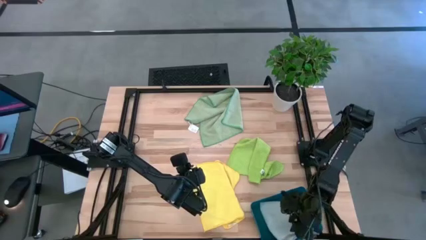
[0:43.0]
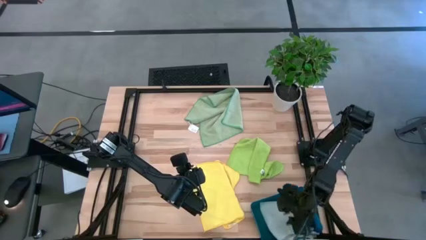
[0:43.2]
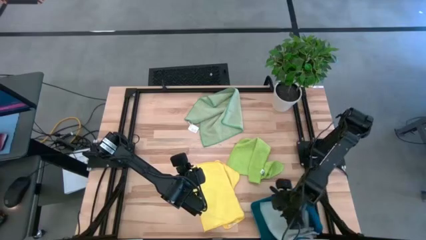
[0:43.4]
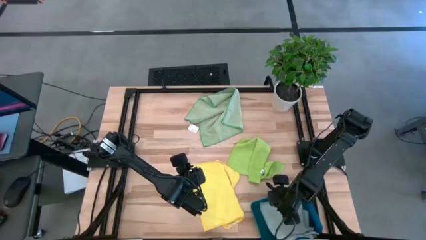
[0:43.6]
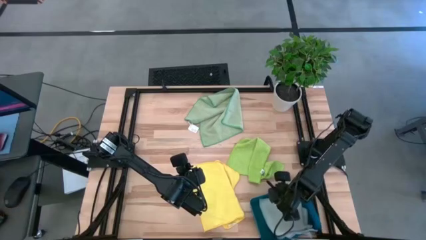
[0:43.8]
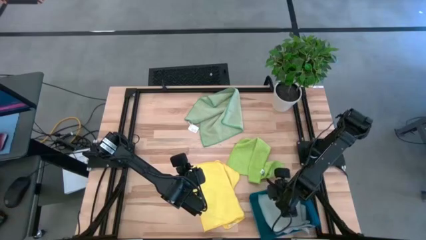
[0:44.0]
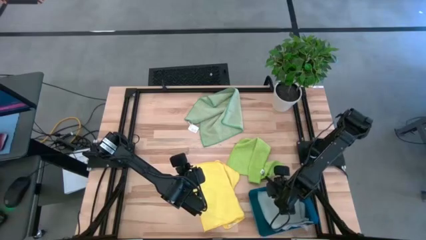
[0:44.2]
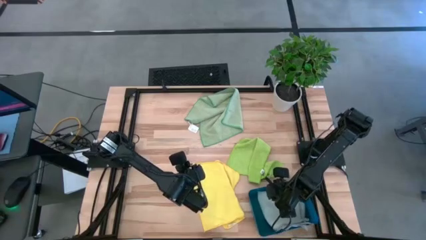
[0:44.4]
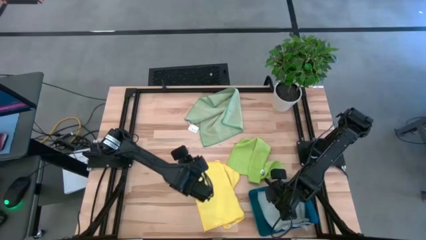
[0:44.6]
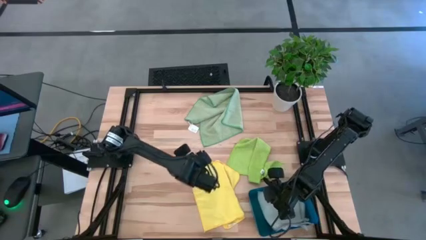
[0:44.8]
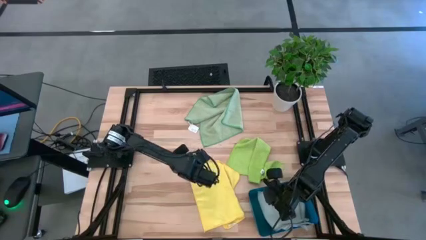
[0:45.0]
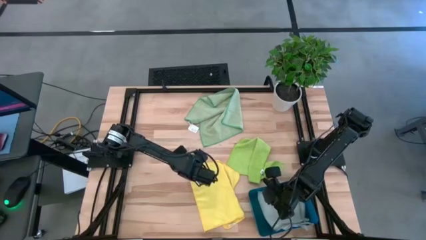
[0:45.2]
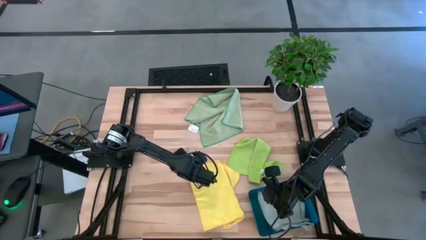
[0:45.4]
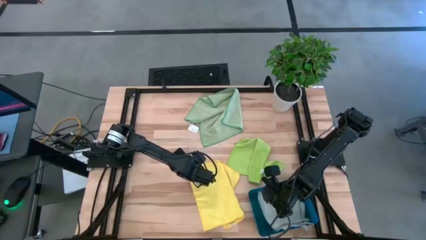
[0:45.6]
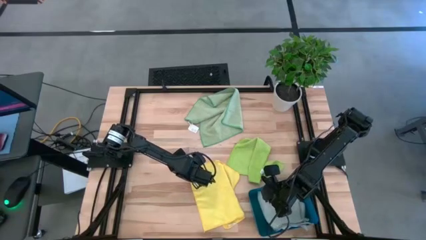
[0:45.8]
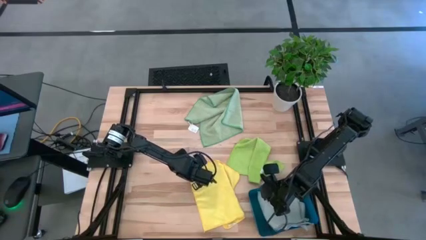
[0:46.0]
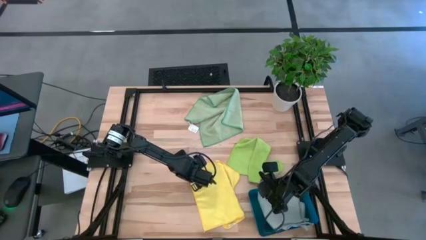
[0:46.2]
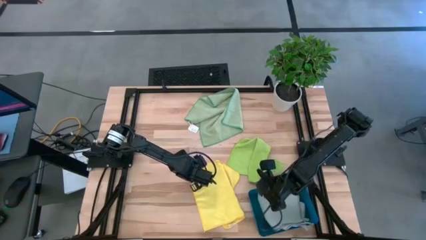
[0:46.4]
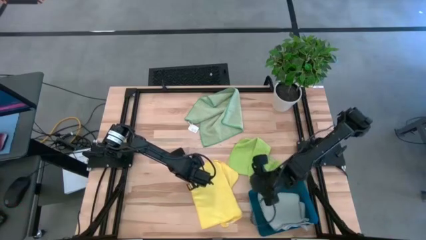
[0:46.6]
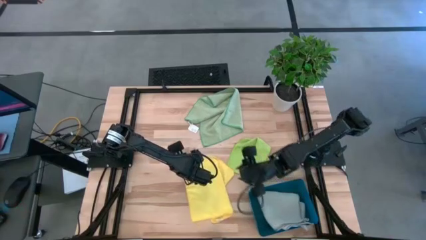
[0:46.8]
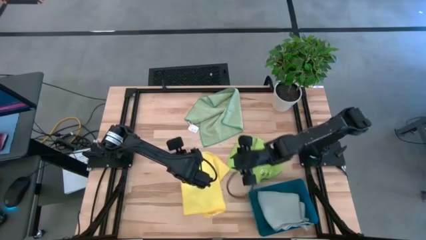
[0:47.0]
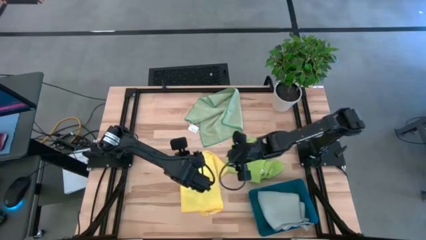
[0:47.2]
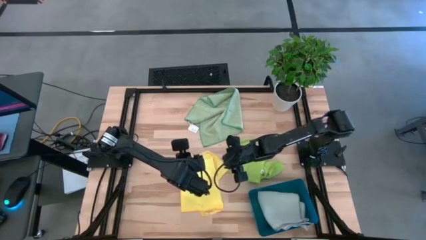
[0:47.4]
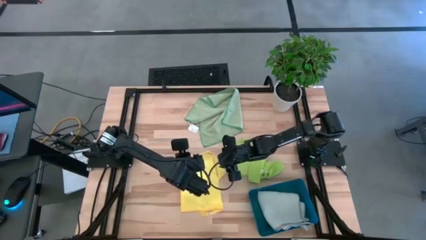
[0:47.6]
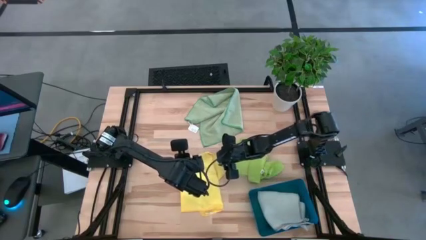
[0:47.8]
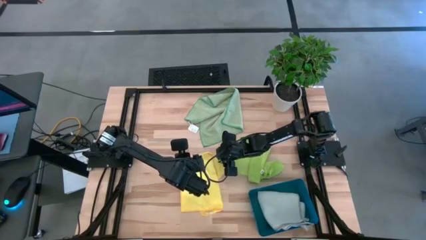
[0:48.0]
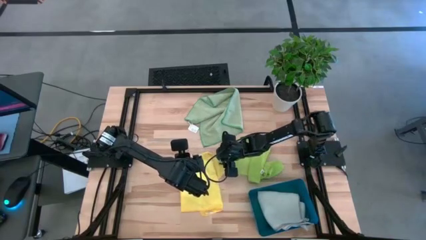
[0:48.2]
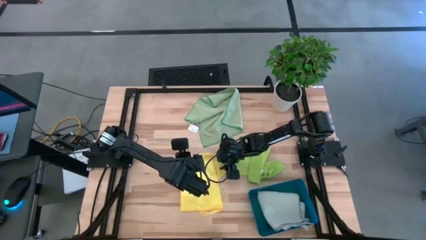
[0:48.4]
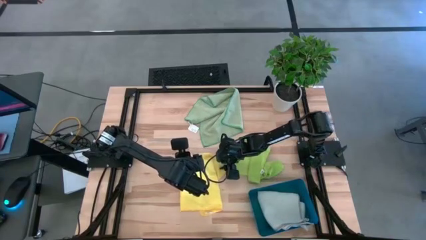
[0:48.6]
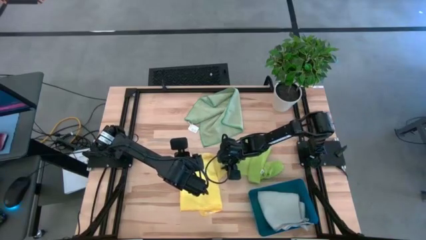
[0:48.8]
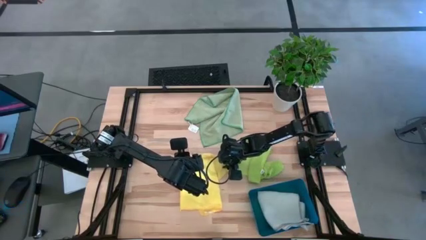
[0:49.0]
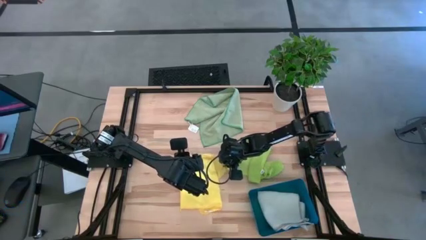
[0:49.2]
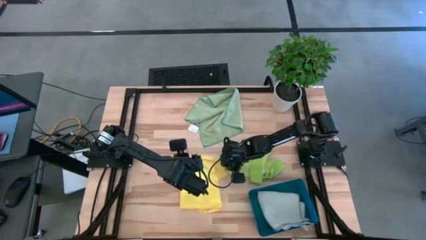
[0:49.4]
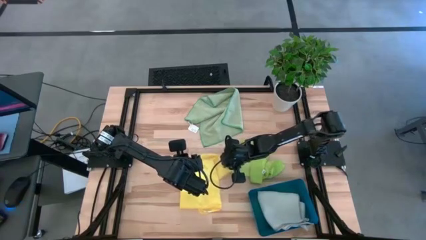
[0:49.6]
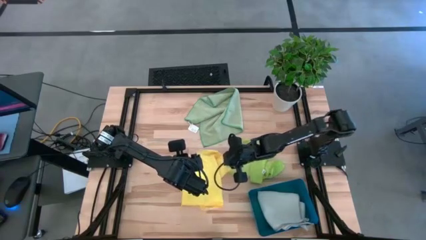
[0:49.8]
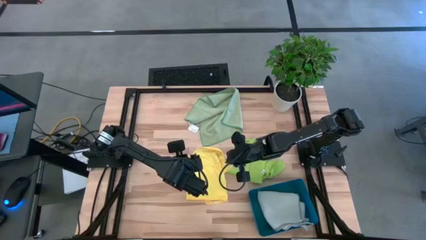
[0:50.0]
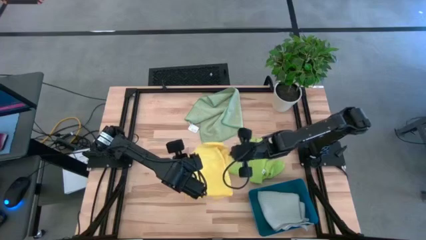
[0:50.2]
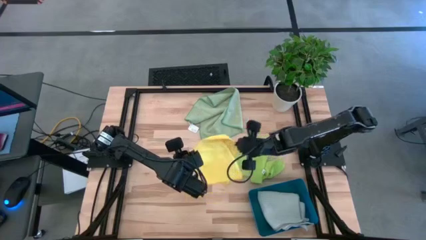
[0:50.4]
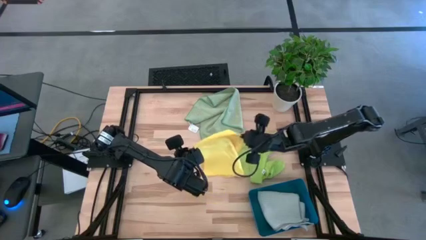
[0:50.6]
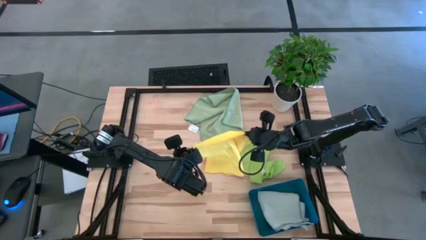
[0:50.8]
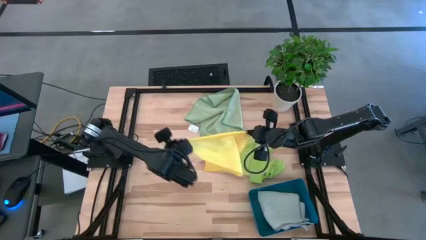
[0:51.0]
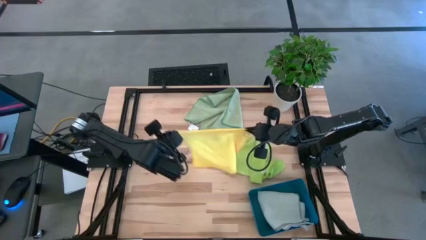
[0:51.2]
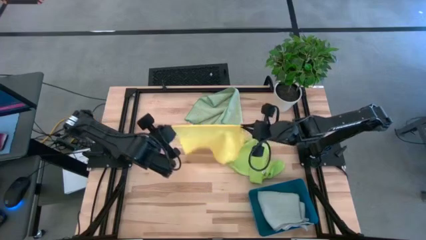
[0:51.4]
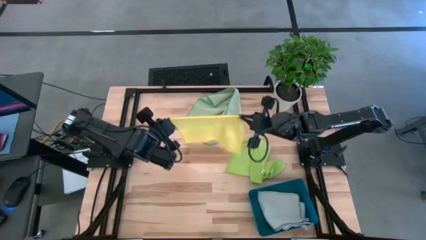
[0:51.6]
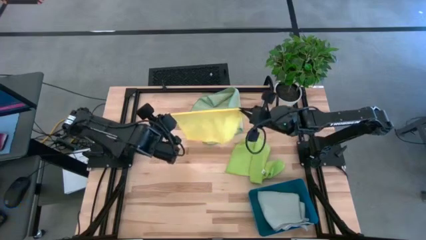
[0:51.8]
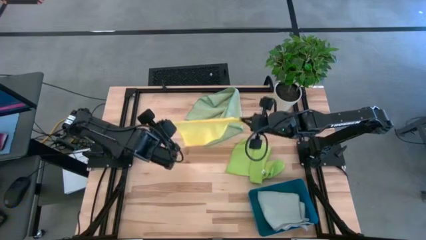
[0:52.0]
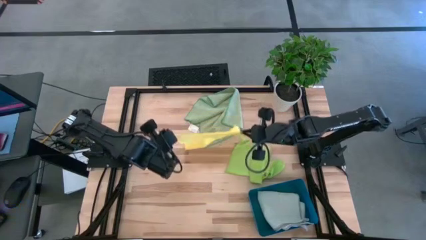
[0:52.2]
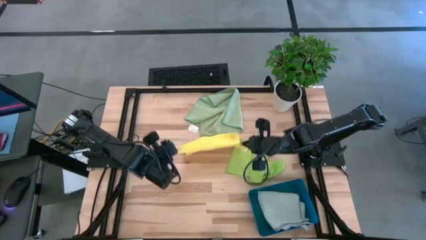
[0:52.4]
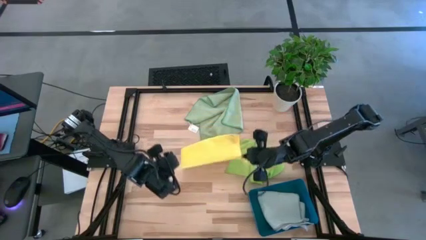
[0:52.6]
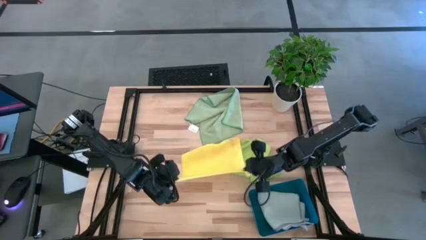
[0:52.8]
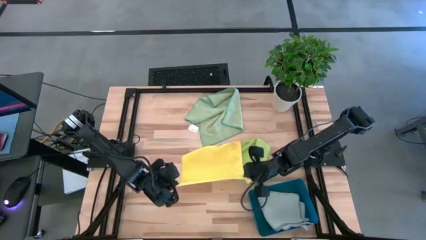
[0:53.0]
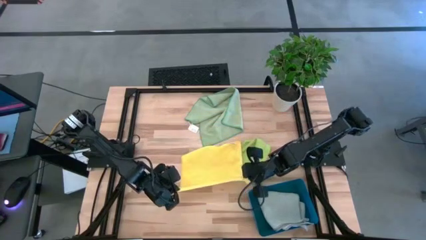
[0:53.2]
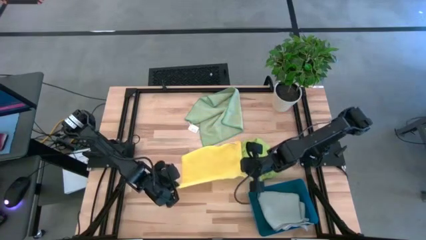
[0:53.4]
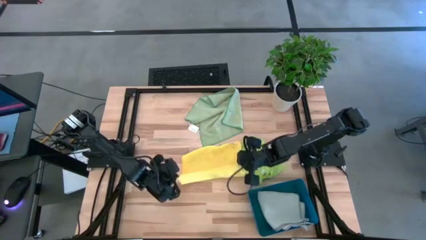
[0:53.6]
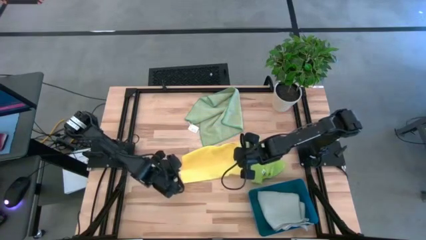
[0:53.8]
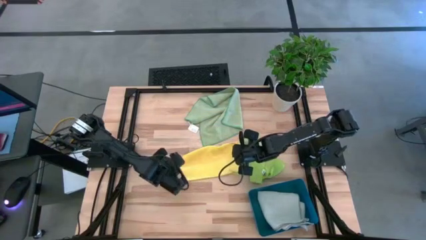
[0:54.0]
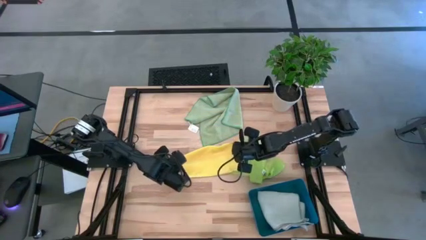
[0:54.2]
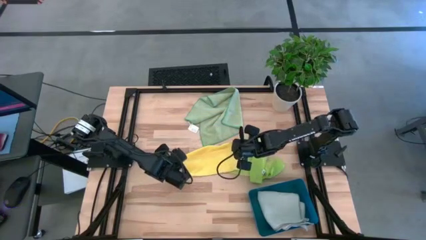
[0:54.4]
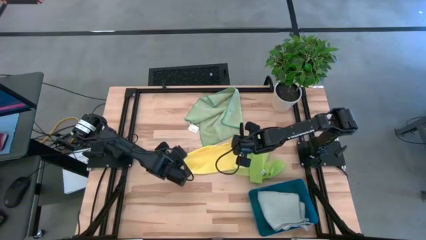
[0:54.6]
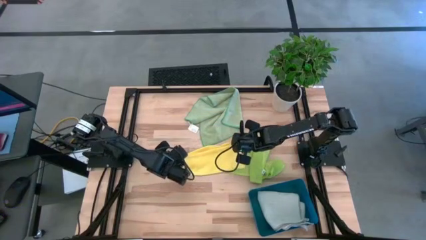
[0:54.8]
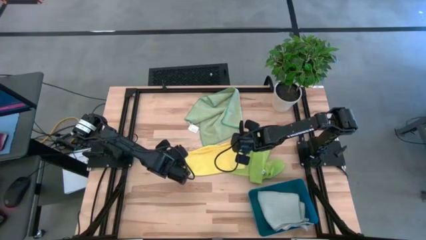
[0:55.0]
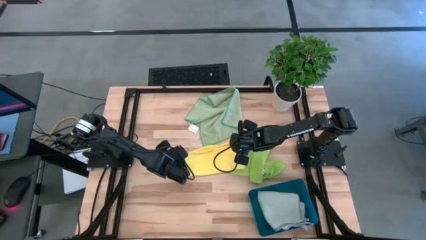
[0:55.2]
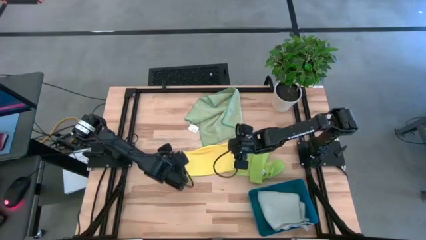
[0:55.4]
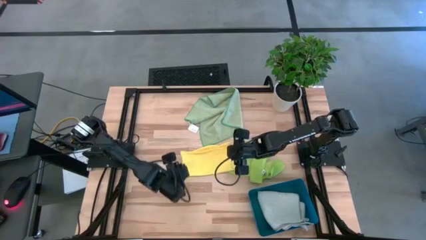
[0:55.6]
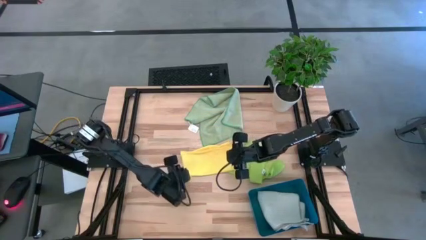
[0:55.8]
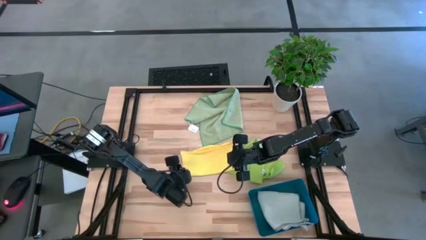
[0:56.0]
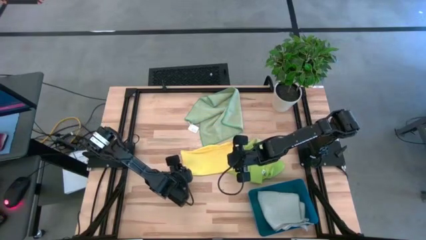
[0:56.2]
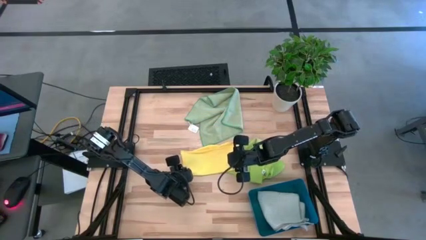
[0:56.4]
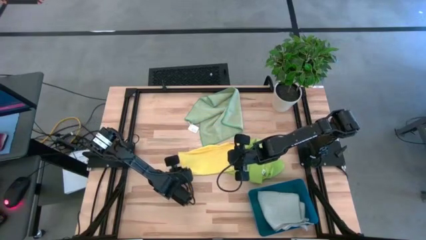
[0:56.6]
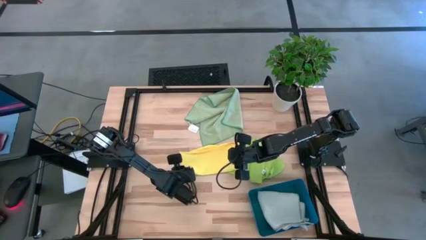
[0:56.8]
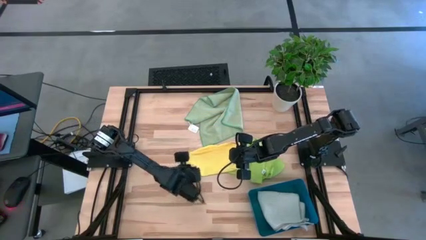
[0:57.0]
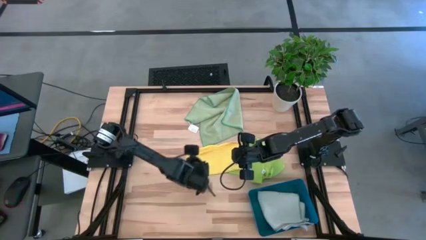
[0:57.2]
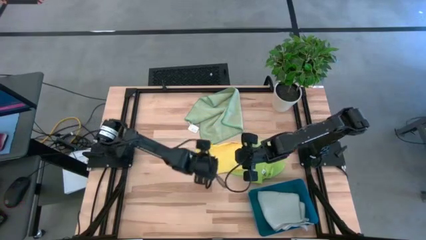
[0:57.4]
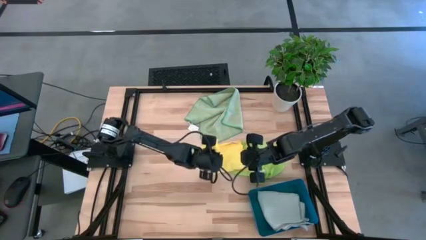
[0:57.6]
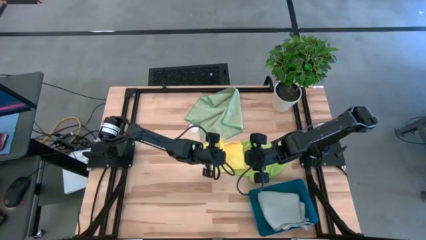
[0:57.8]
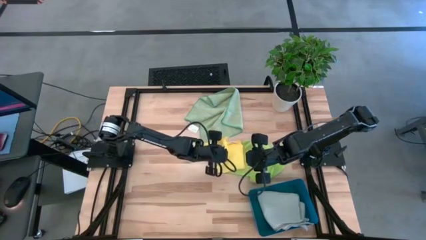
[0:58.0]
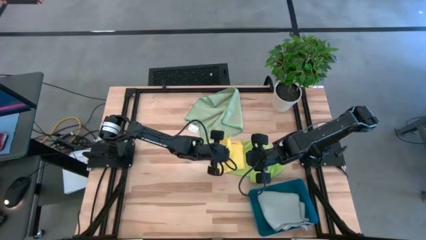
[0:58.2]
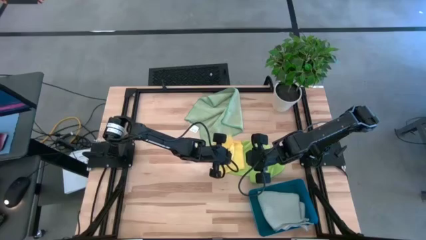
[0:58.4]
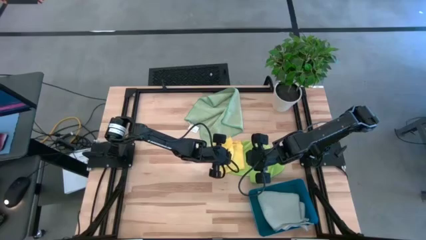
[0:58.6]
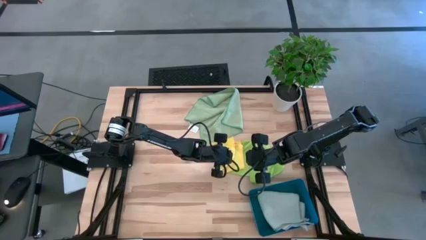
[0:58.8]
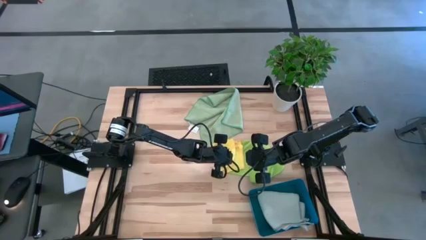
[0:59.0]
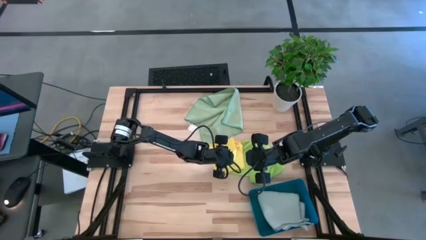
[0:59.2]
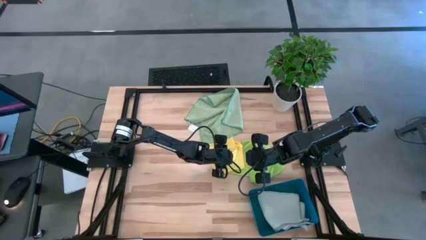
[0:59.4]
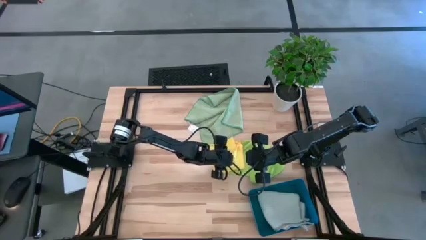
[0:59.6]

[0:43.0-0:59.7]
Task: Fold microfiber towels
Fold the yellow towel
